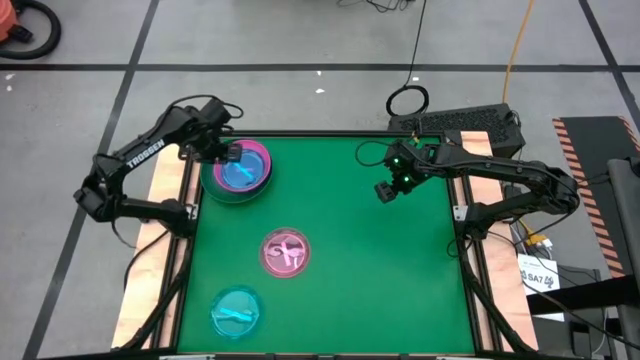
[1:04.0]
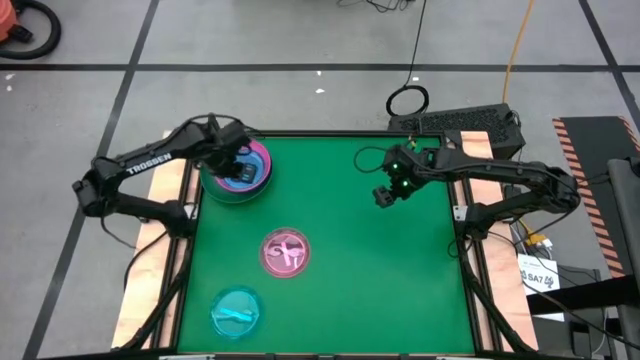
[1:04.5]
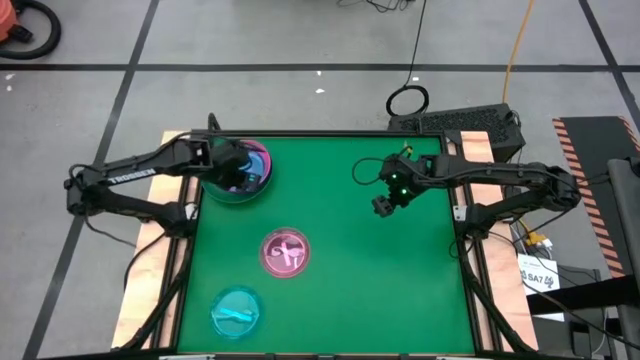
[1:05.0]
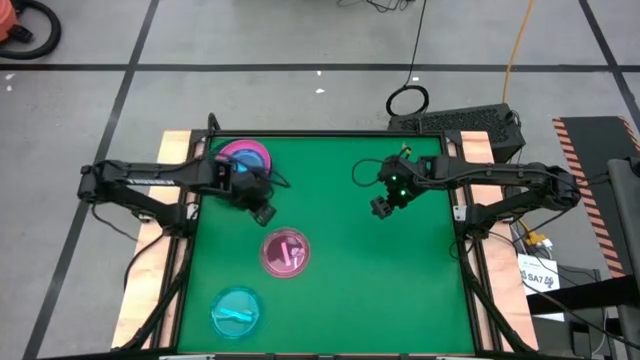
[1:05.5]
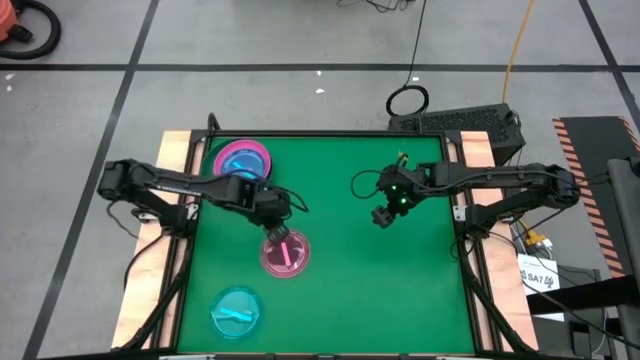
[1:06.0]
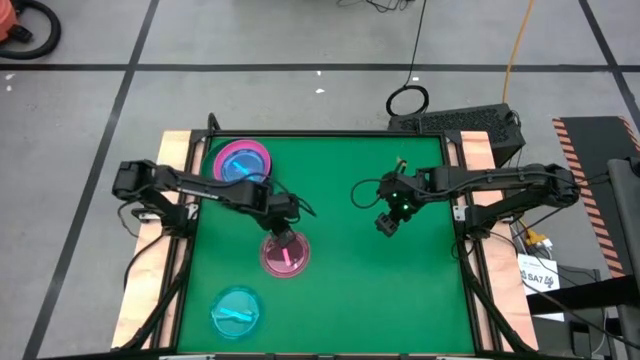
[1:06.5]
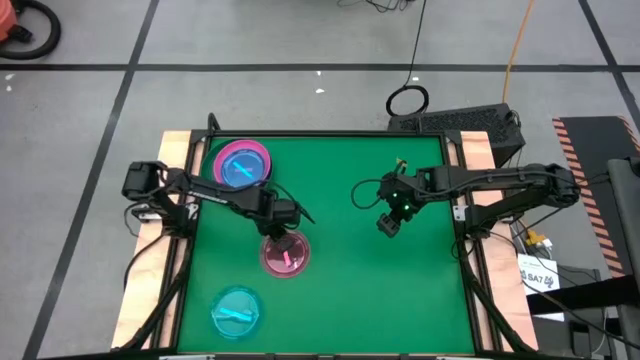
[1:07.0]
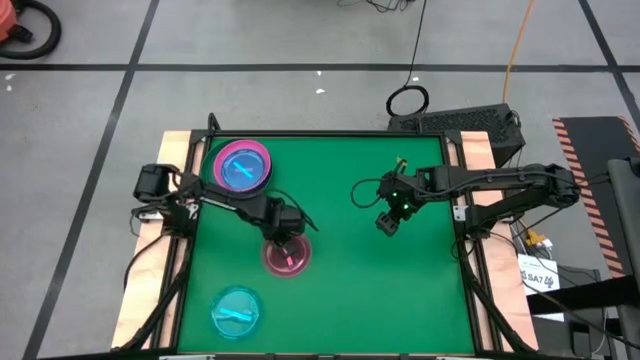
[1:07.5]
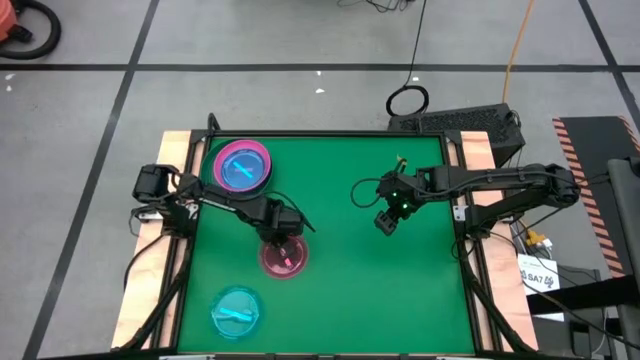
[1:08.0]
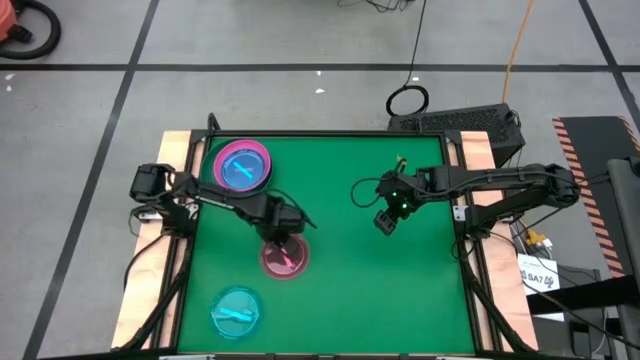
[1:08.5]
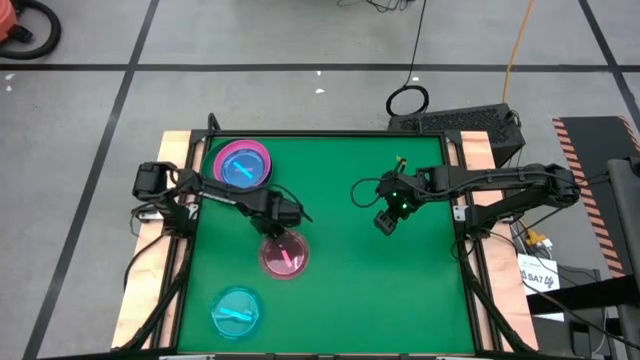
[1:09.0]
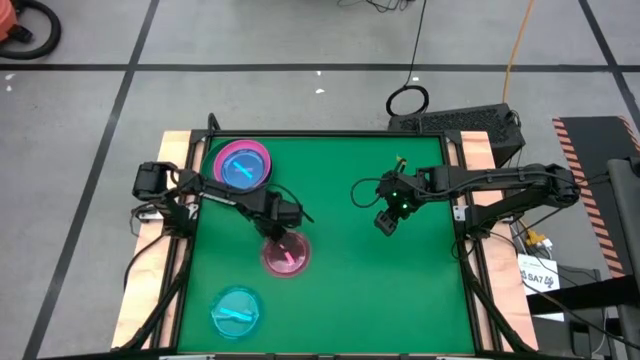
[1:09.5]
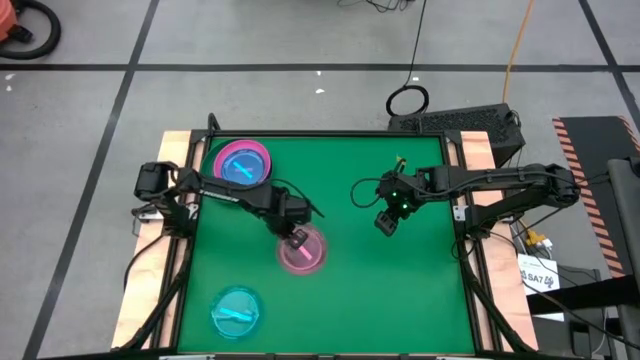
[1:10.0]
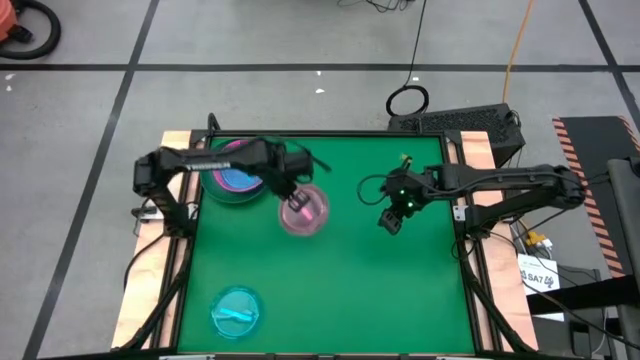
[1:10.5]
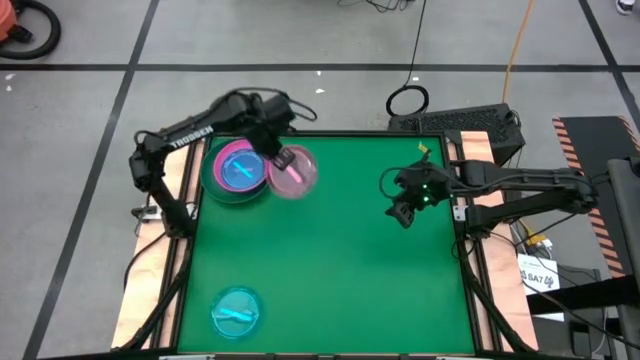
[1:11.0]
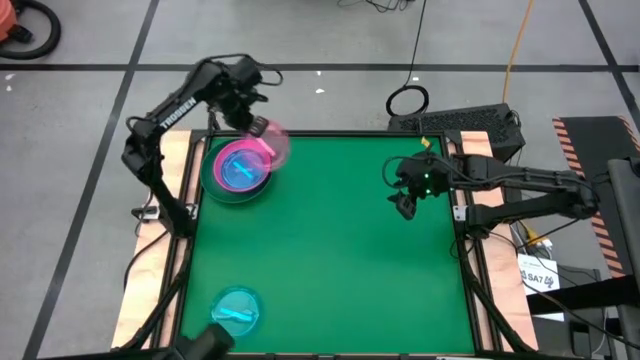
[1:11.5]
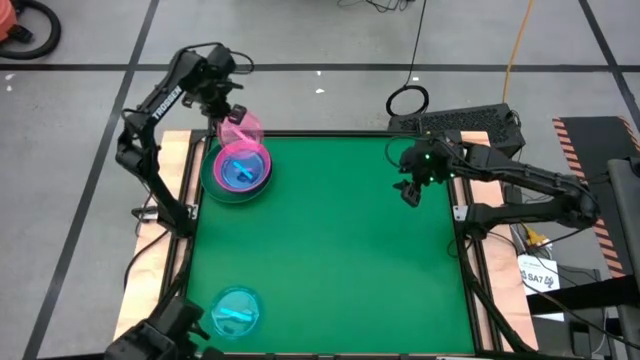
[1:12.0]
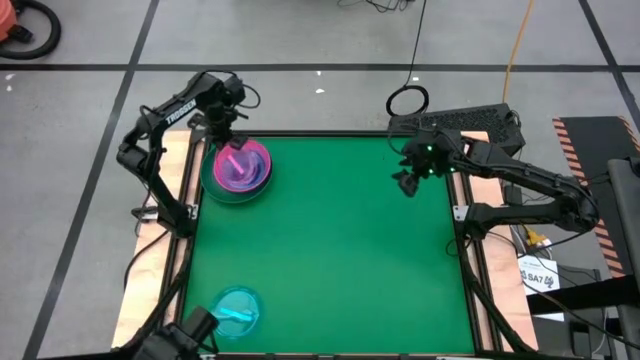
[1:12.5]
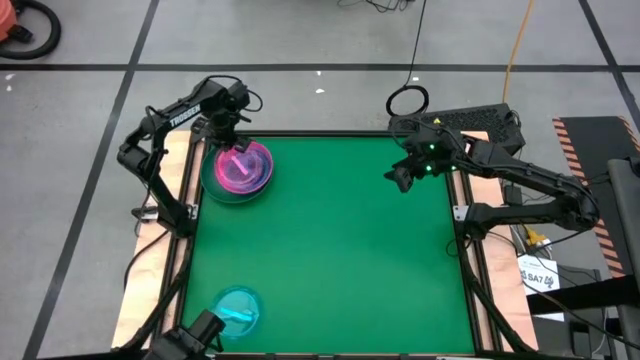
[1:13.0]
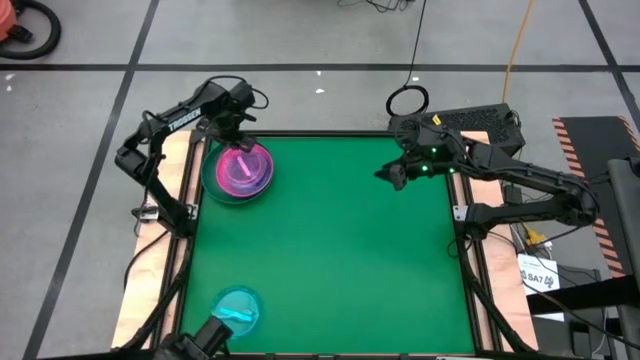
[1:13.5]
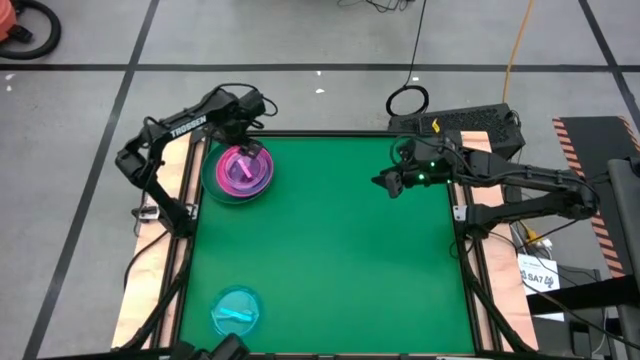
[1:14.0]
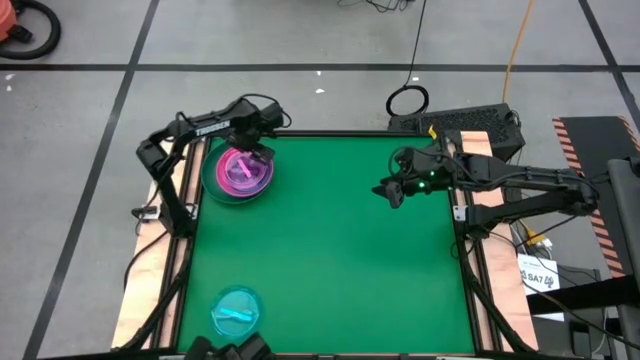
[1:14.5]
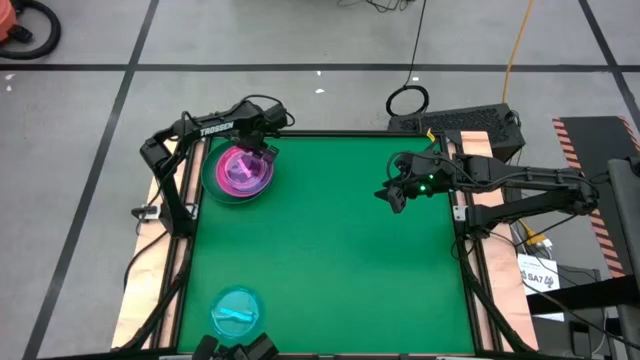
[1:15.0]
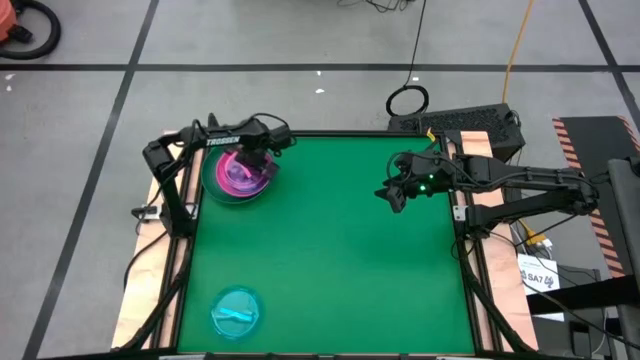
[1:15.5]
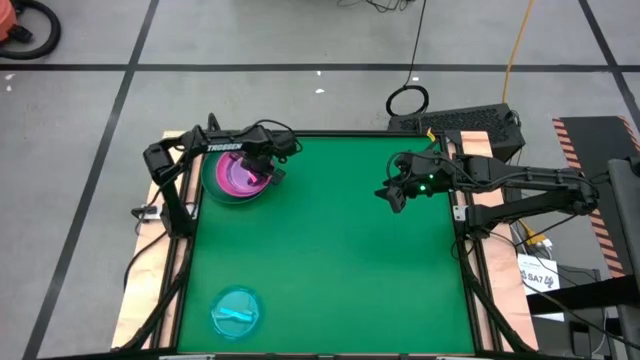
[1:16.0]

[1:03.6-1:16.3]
Task: Stack plastic plates
Stack the light pink plate on top of the blue plate

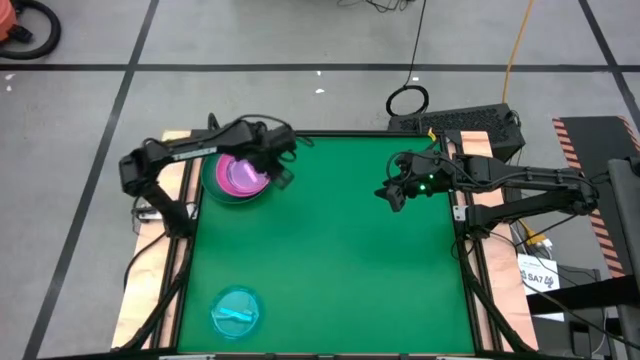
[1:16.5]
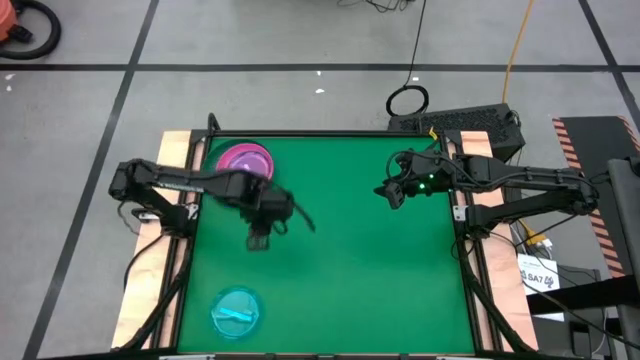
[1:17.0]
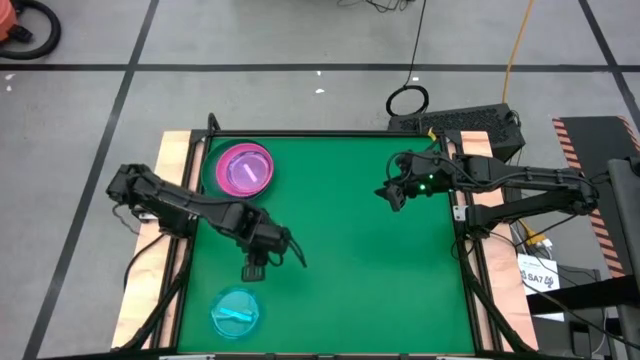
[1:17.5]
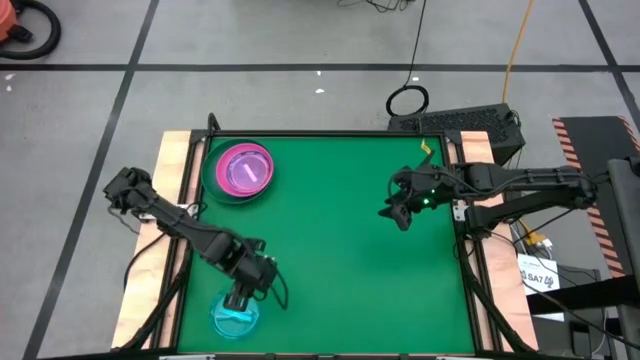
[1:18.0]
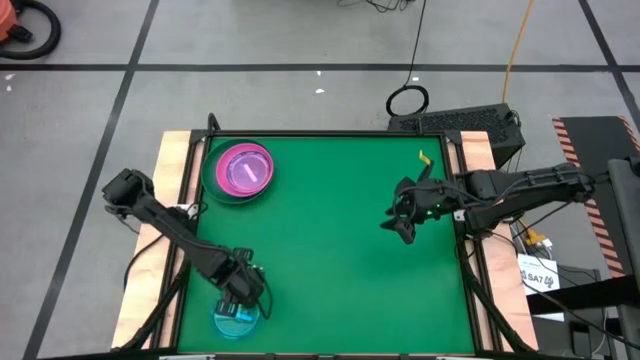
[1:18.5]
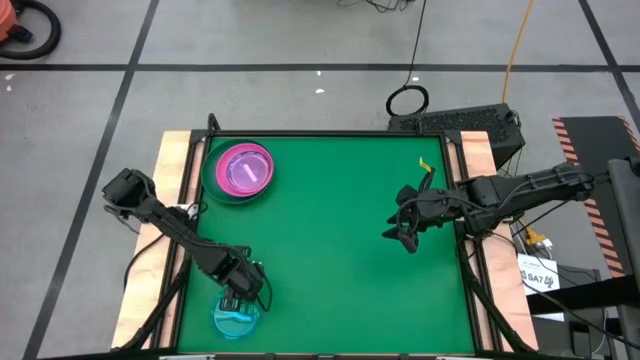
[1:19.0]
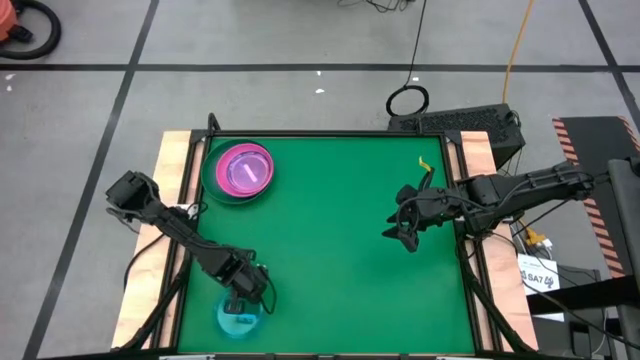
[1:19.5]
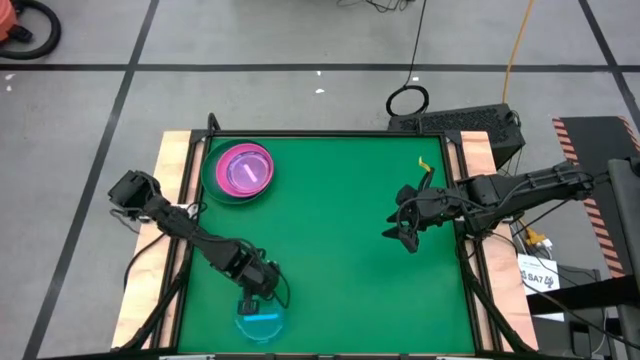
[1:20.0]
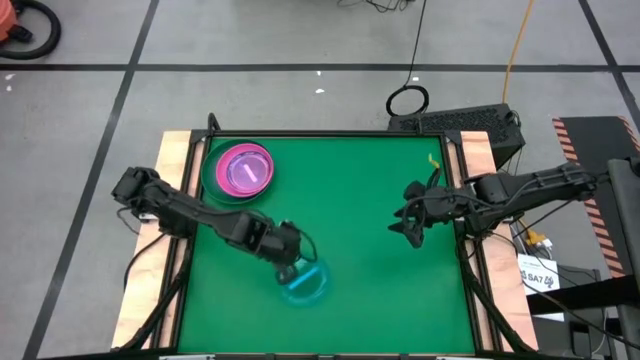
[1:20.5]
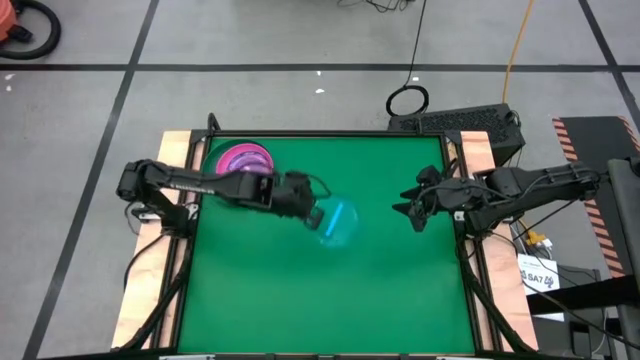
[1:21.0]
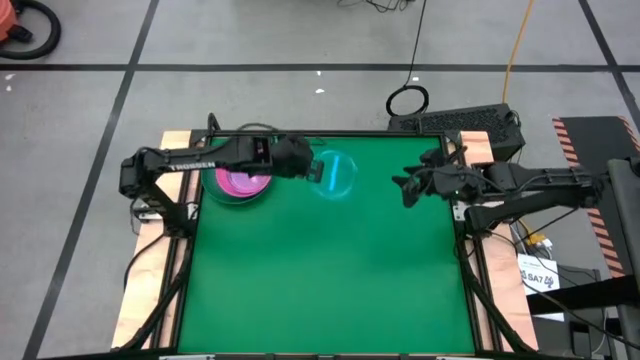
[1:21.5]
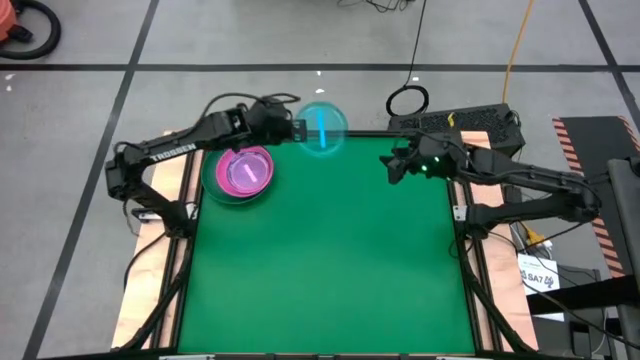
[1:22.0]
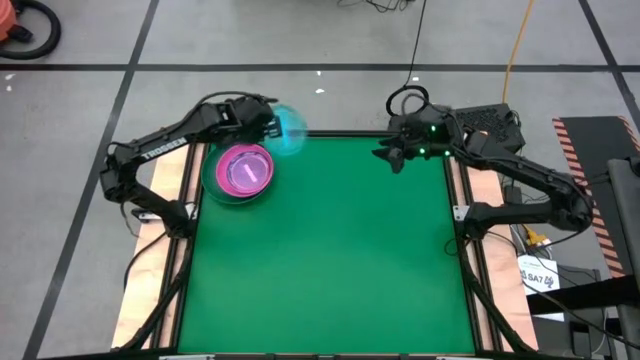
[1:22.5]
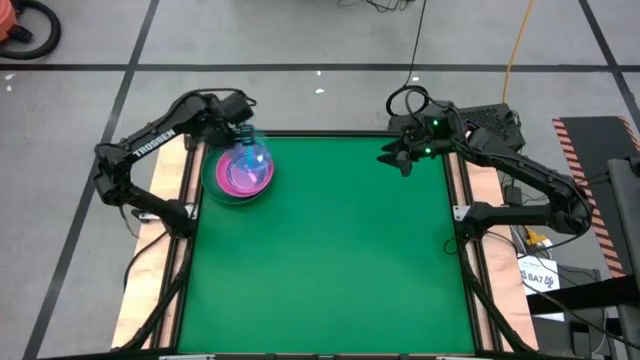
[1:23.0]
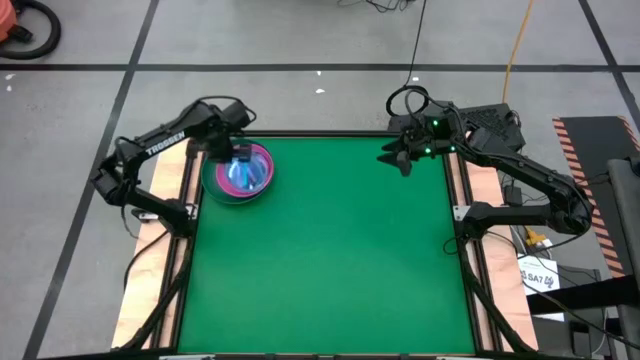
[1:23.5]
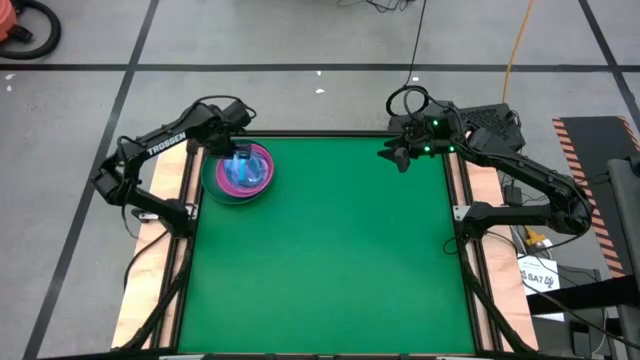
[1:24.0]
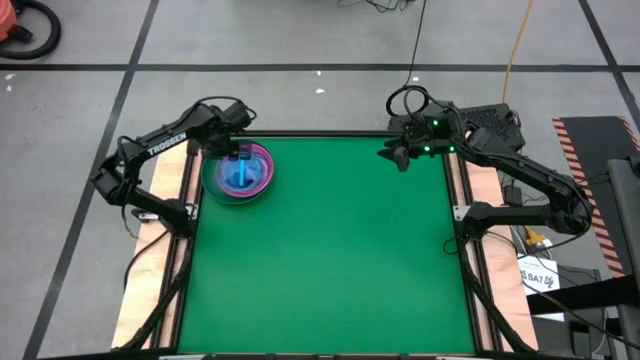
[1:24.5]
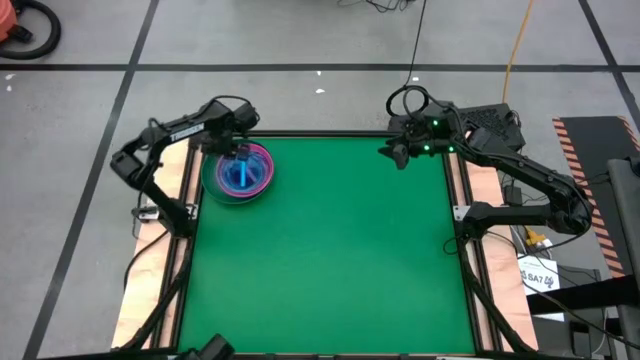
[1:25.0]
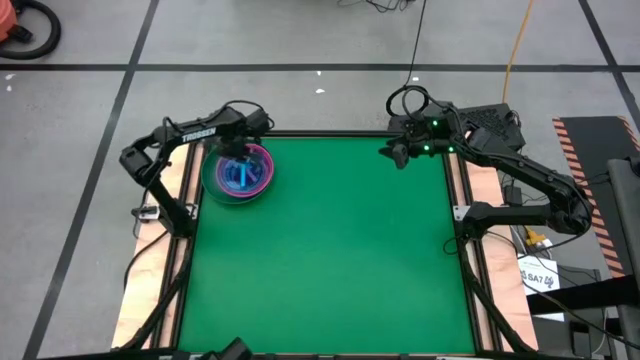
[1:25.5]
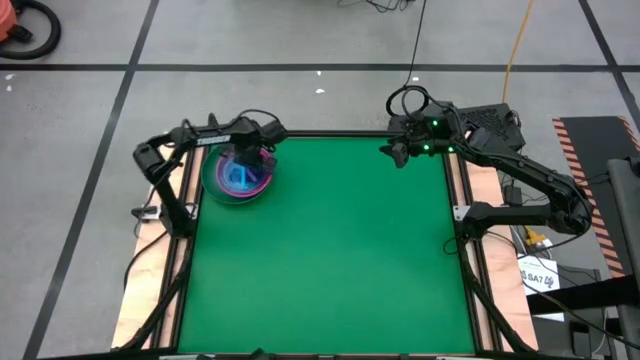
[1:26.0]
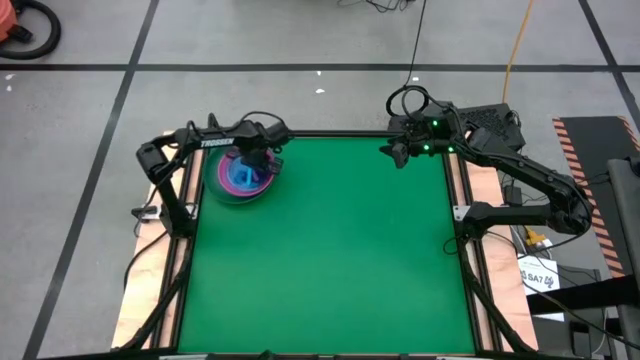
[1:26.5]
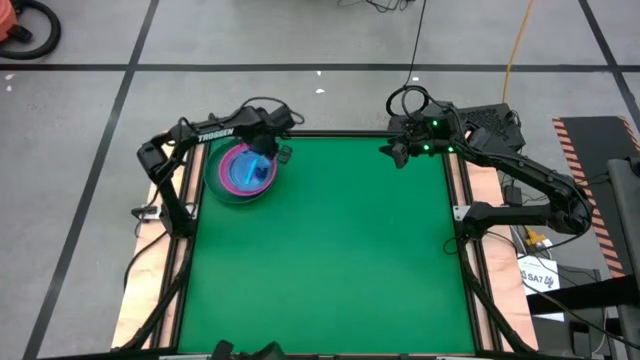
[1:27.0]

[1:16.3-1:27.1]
Stack the blue plate on top of the light pink plate
